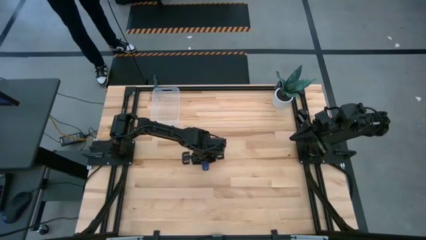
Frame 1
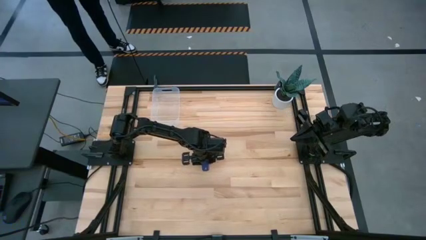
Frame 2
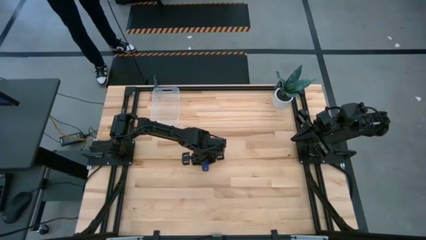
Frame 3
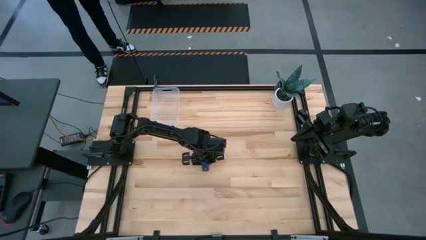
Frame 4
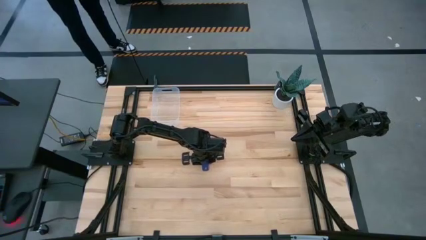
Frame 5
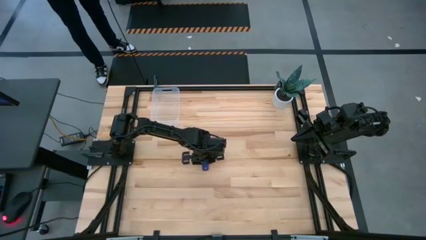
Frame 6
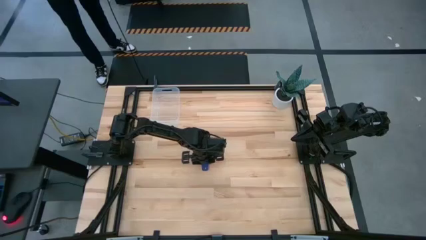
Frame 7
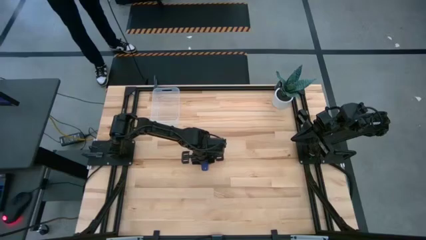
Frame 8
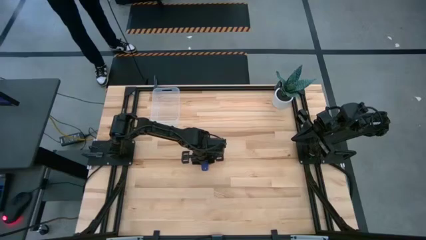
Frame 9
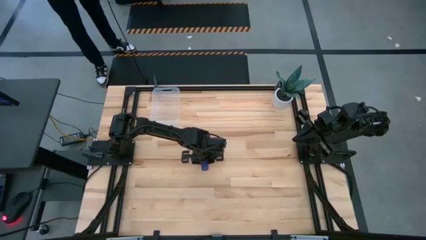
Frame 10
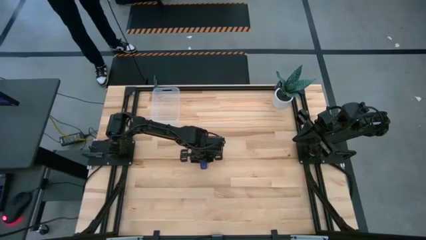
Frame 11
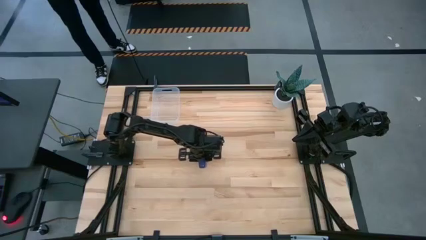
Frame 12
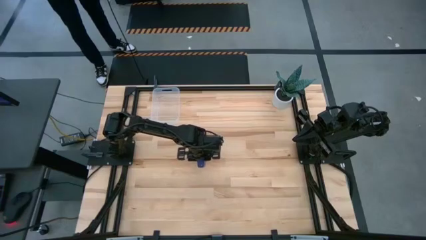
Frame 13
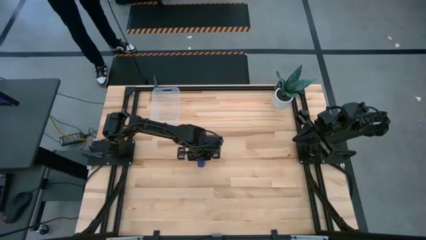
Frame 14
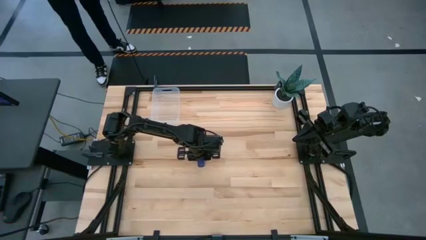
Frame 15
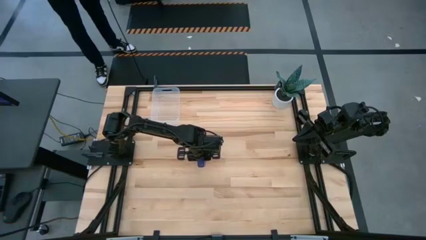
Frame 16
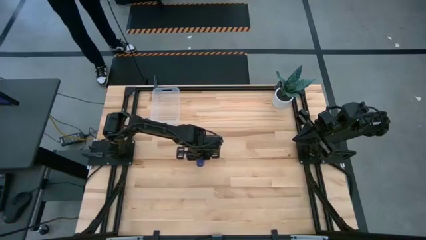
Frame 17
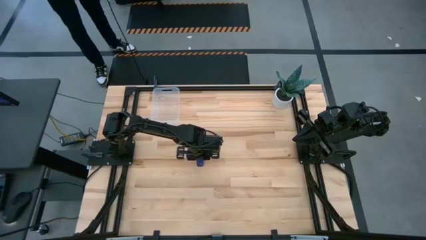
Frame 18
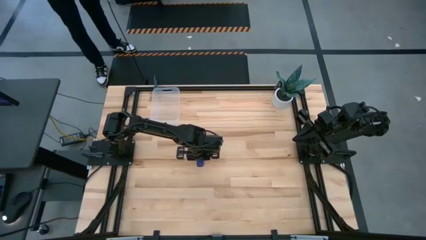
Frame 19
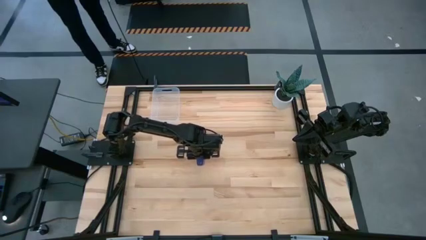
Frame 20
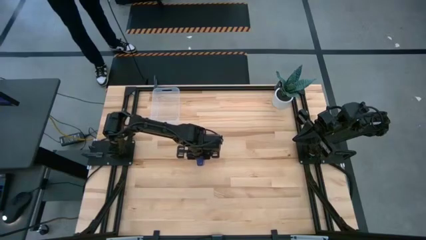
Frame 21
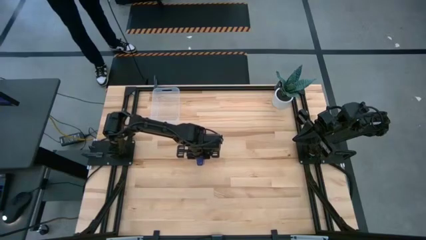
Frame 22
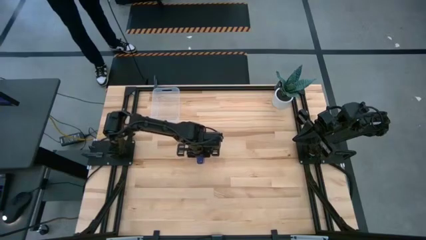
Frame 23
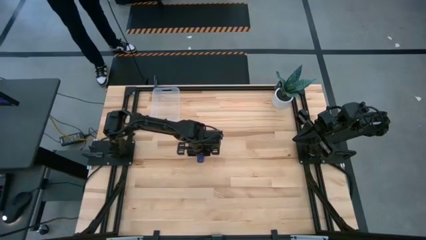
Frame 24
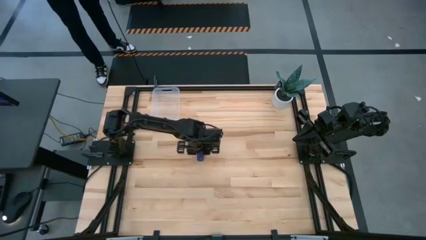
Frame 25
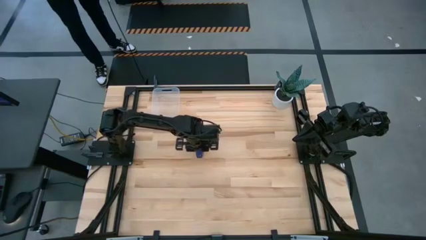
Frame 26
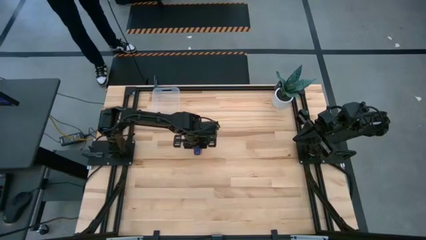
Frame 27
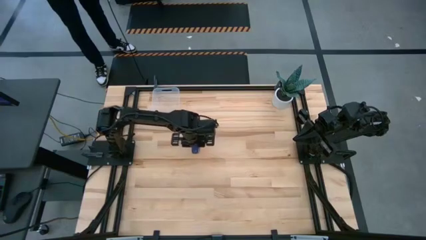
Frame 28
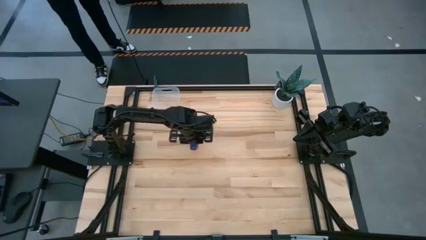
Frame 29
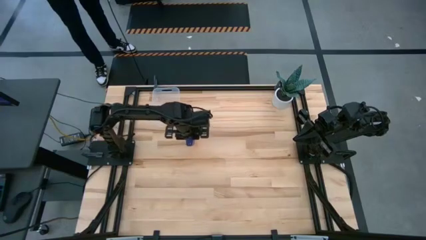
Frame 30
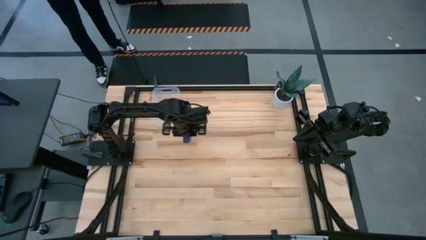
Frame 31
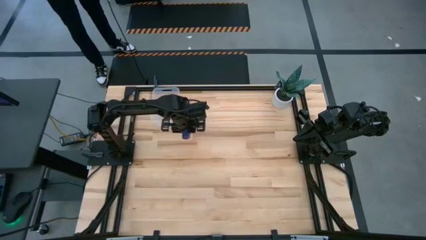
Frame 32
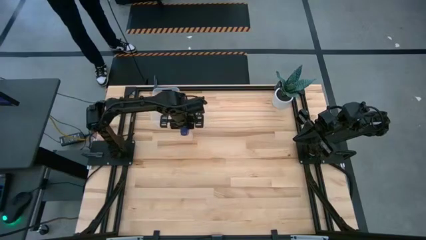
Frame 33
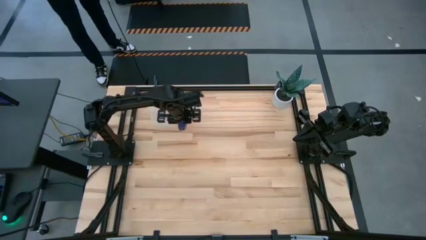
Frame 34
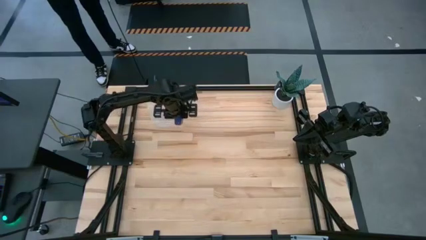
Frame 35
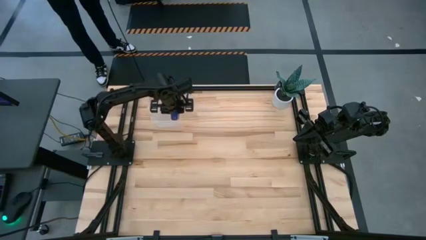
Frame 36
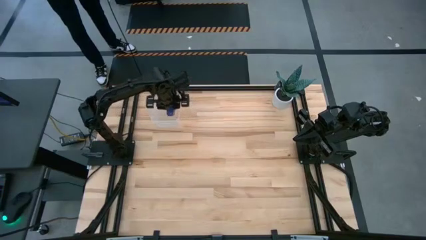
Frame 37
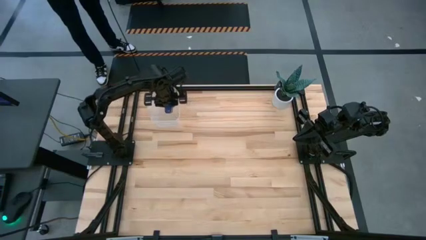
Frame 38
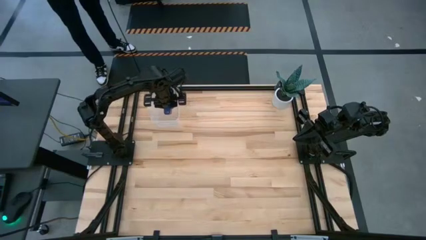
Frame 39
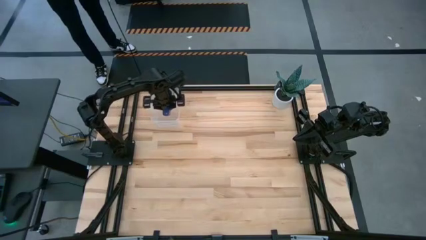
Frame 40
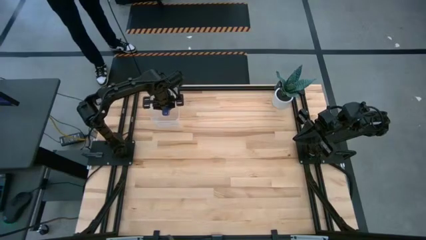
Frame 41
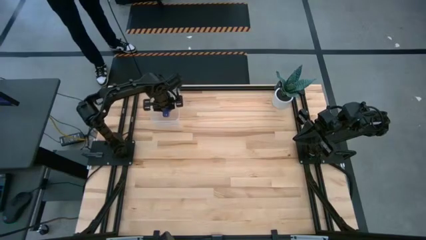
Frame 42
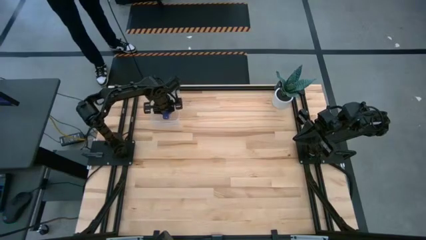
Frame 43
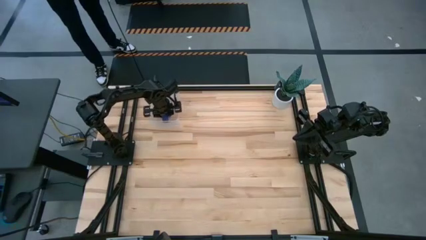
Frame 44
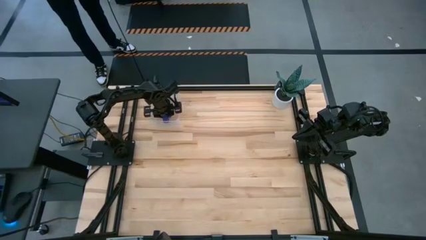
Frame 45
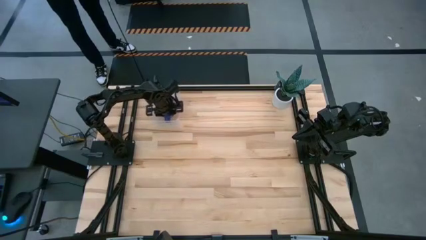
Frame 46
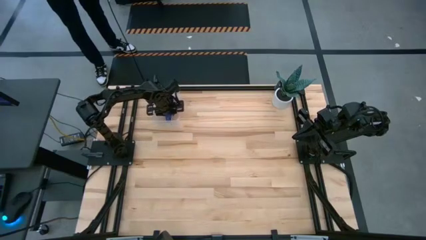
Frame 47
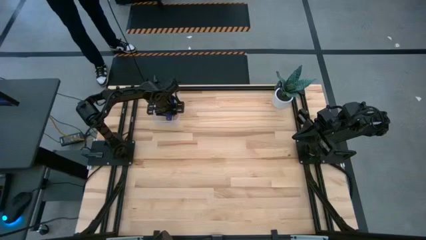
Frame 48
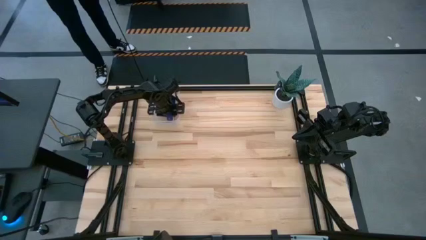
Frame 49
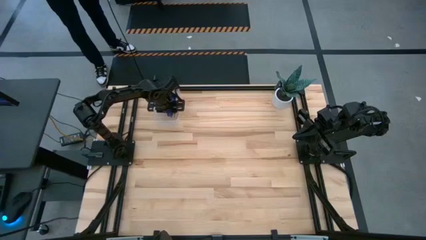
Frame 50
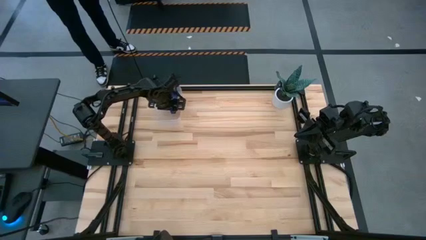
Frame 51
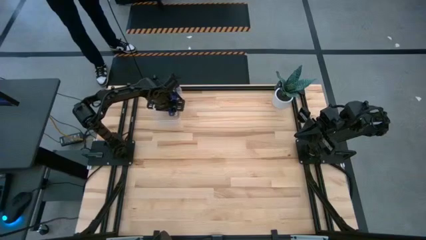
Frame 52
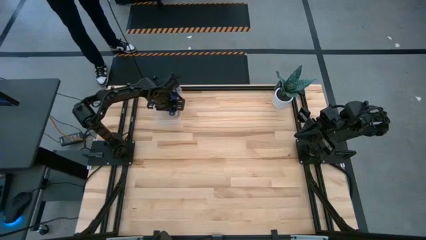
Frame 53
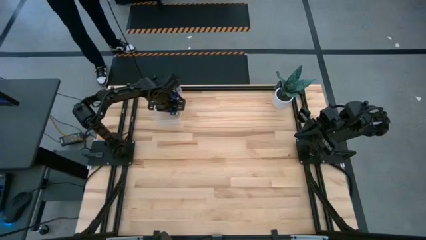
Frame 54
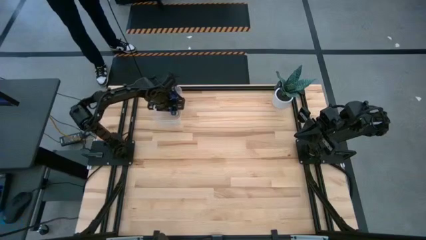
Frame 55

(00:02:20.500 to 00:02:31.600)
Task: Nest measuring cups in basket
Put the measuring cups into the transparent bin

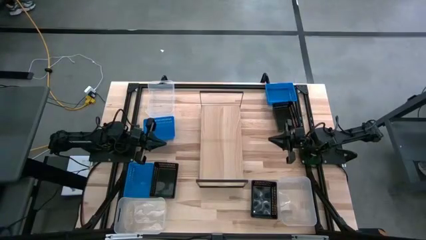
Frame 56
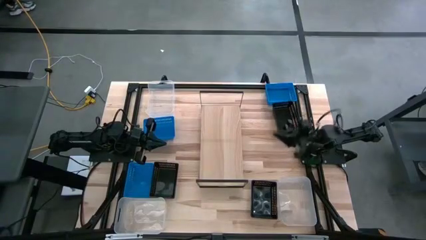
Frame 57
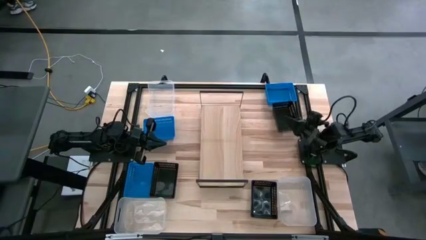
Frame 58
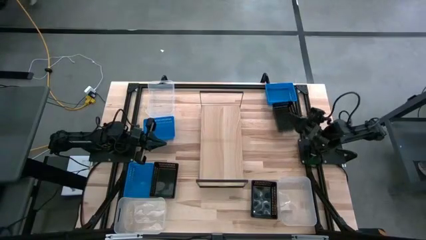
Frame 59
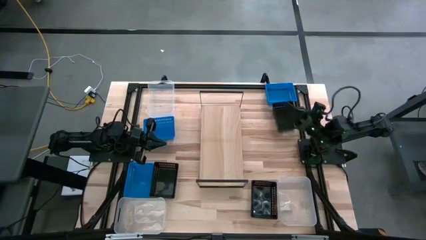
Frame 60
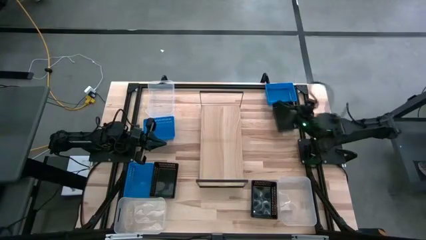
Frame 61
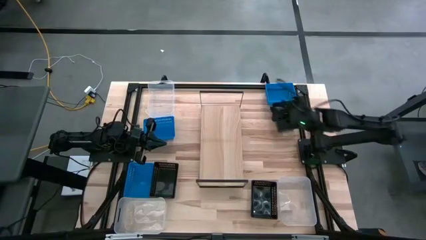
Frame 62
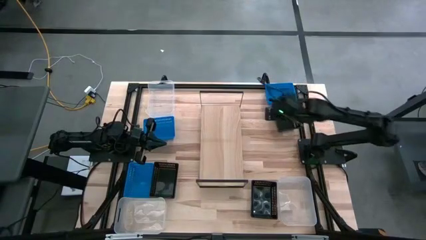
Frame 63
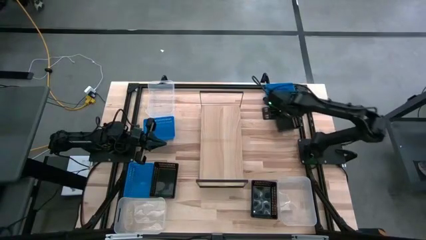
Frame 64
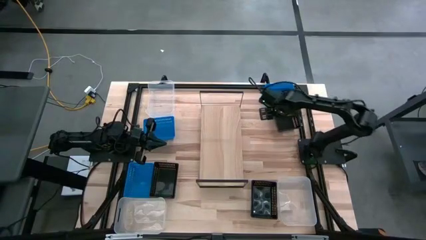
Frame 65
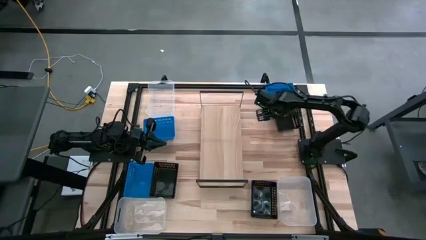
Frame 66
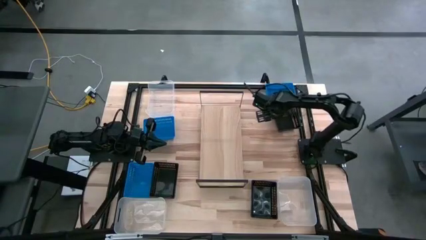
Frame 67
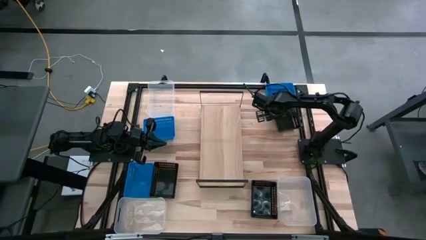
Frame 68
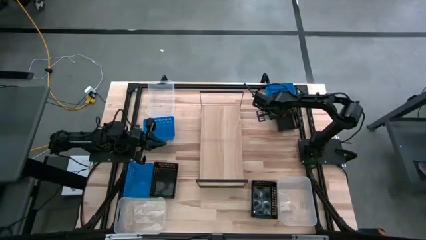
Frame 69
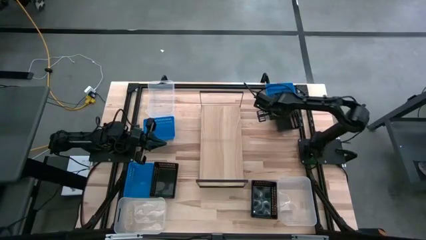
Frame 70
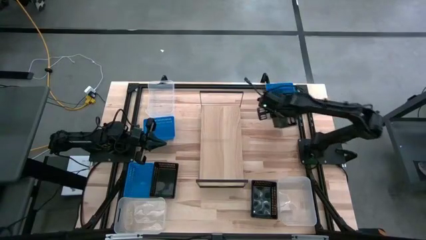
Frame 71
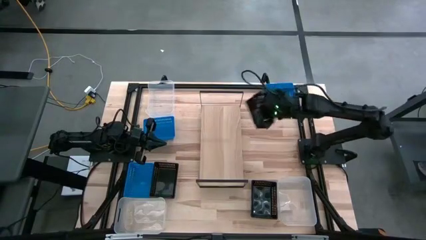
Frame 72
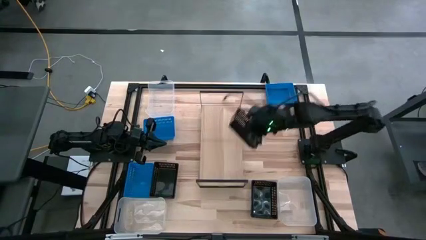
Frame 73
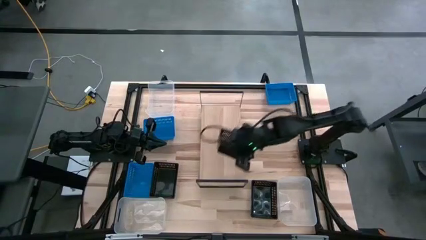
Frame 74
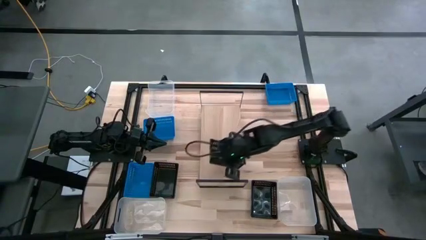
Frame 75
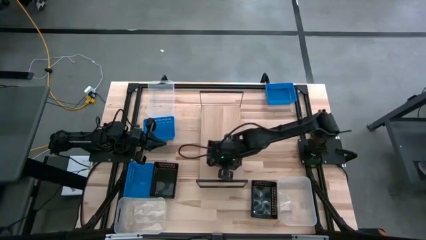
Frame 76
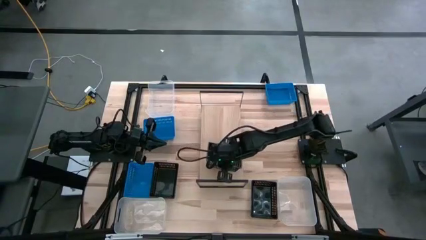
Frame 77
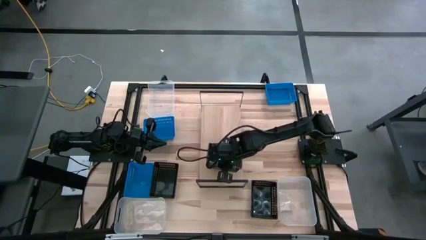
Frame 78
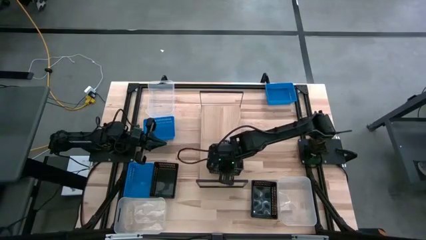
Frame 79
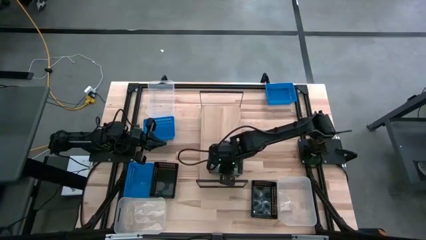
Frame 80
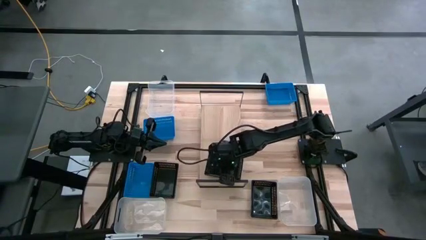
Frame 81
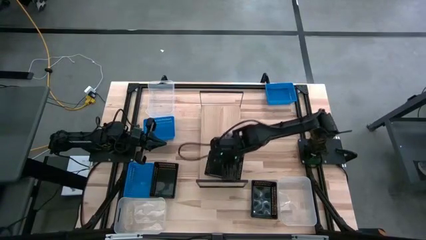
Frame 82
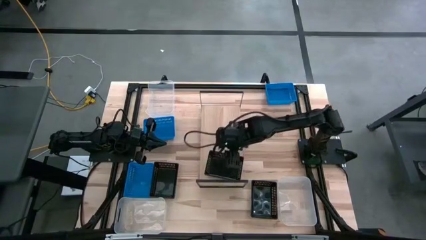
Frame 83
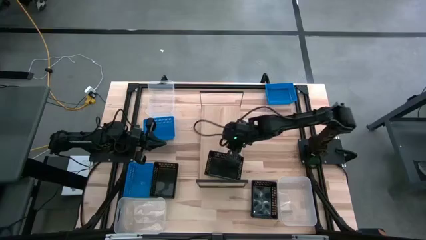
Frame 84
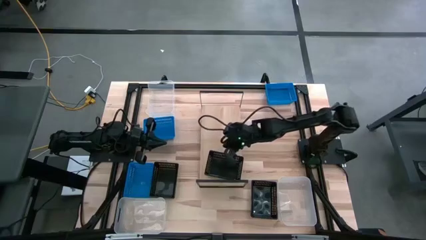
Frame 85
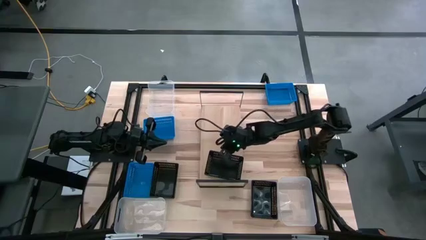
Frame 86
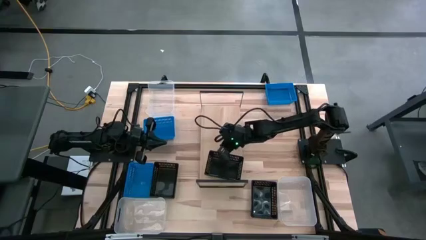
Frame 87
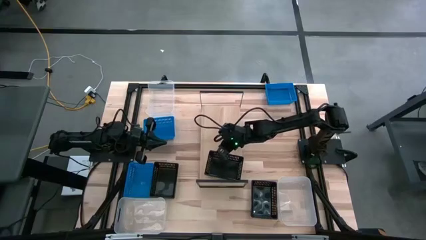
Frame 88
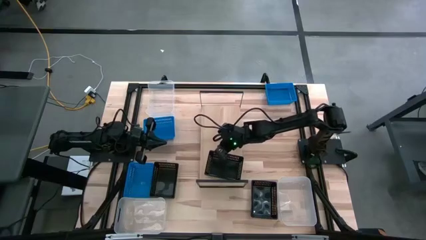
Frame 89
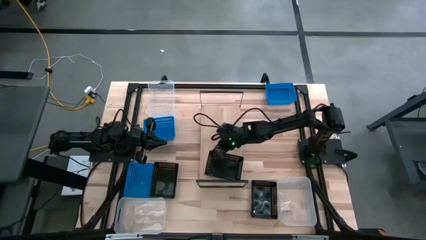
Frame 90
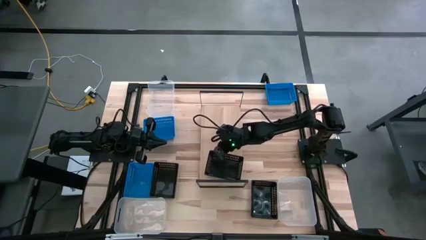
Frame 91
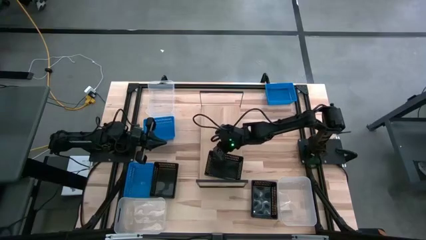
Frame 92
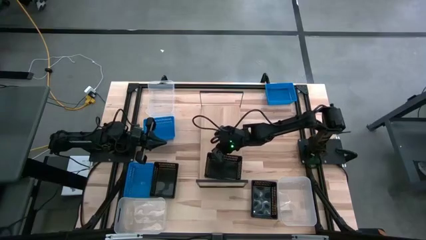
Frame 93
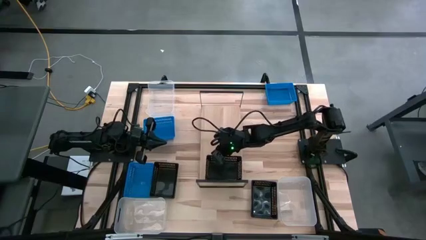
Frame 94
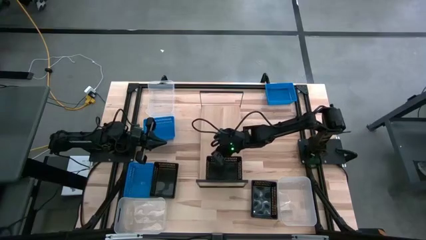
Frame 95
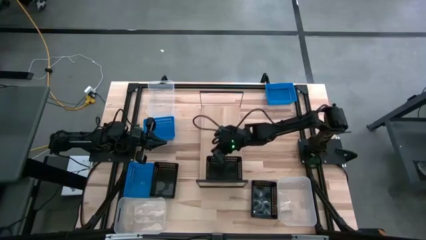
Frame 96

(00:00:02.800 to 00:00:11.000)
Task: Stack baskets on shelf by color
Put the top black bin on the shelf
